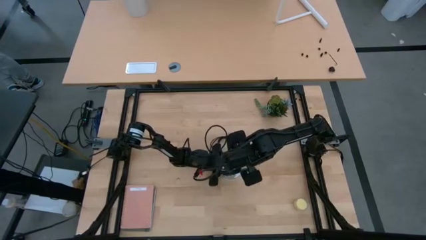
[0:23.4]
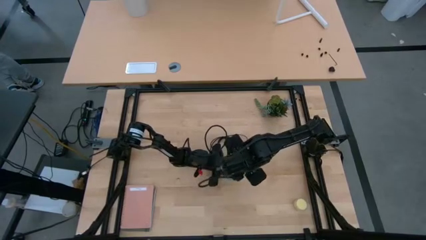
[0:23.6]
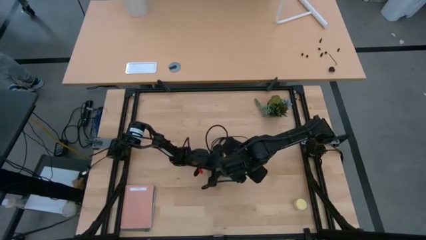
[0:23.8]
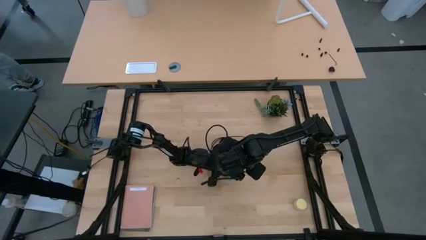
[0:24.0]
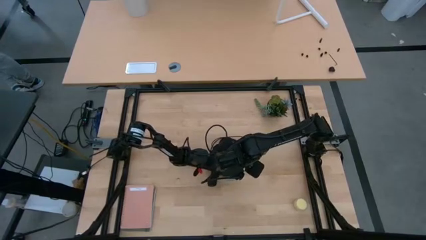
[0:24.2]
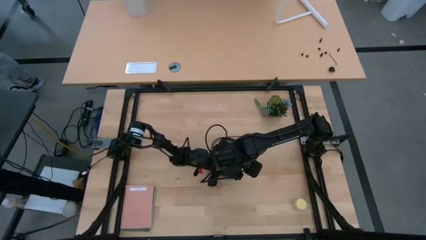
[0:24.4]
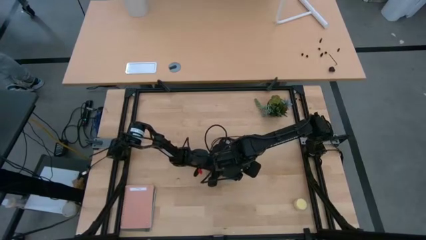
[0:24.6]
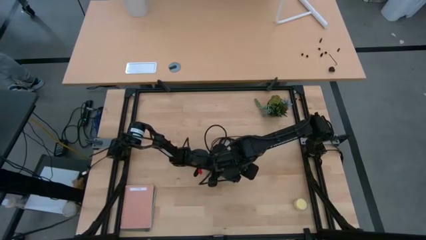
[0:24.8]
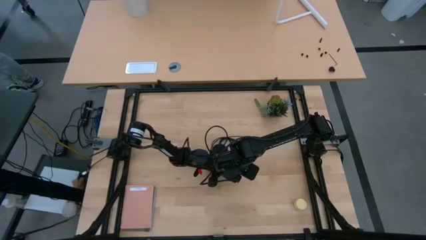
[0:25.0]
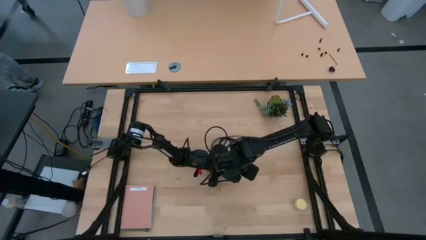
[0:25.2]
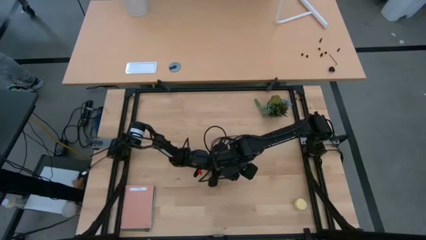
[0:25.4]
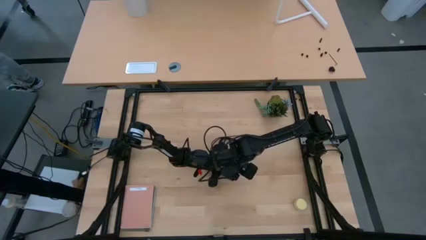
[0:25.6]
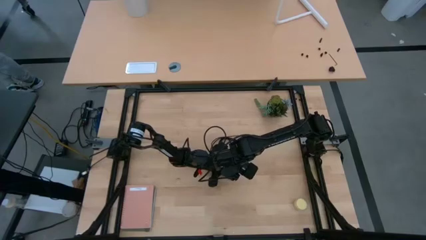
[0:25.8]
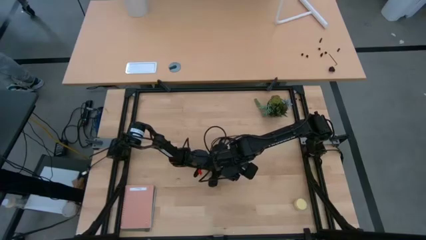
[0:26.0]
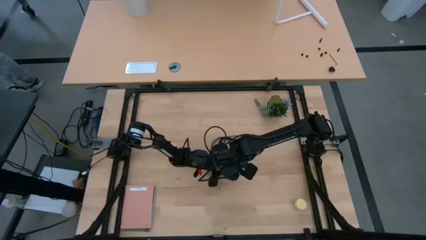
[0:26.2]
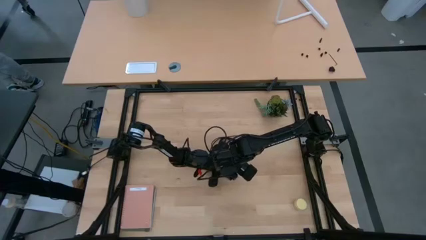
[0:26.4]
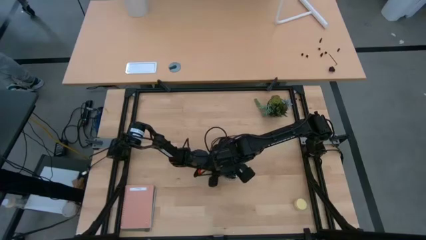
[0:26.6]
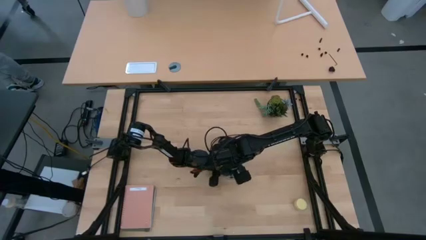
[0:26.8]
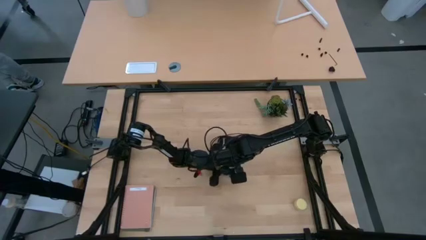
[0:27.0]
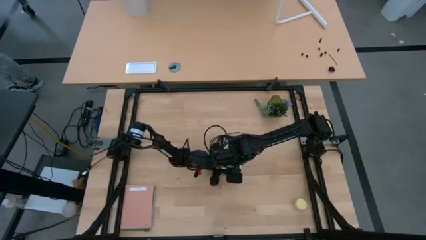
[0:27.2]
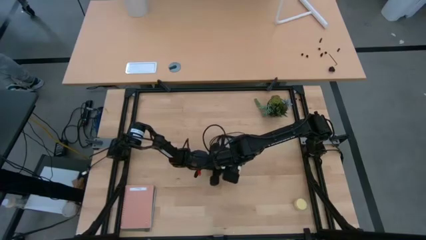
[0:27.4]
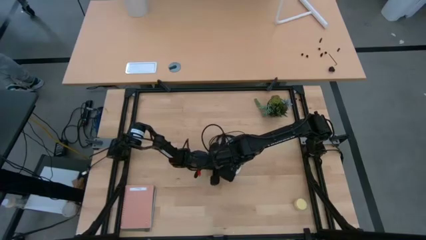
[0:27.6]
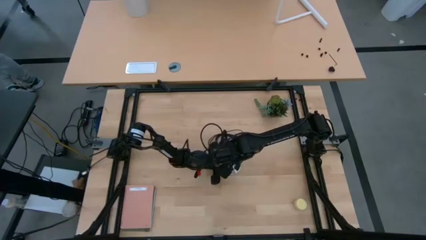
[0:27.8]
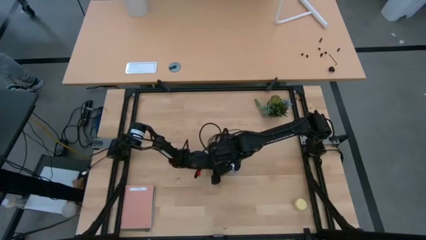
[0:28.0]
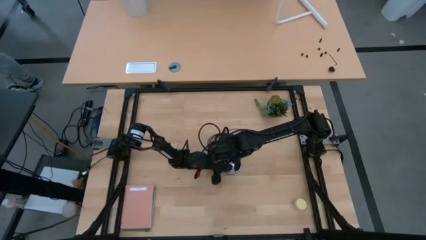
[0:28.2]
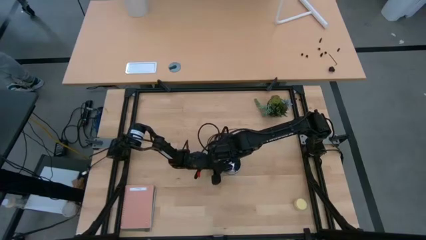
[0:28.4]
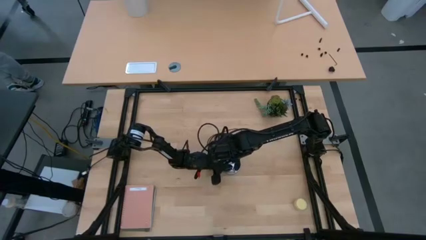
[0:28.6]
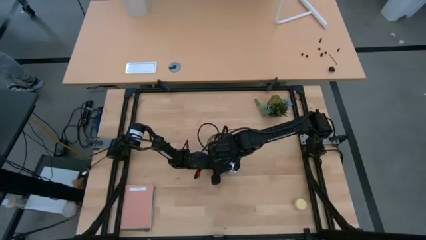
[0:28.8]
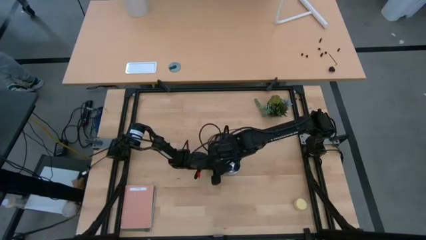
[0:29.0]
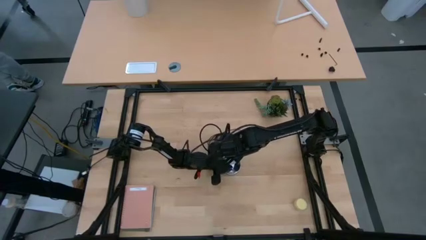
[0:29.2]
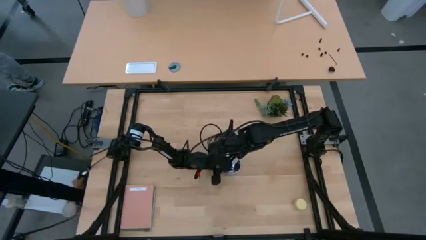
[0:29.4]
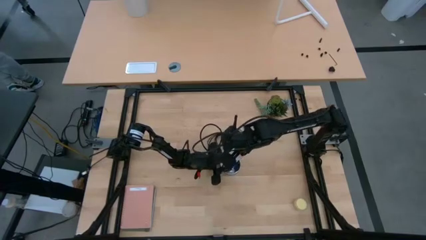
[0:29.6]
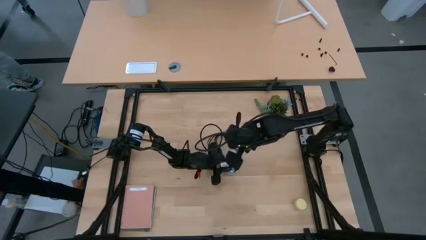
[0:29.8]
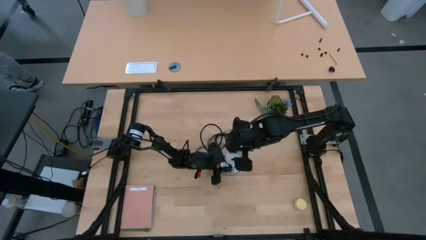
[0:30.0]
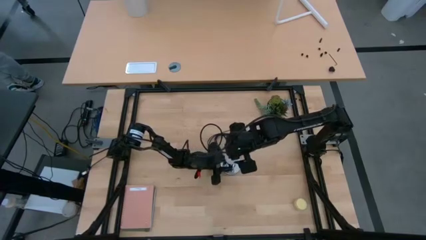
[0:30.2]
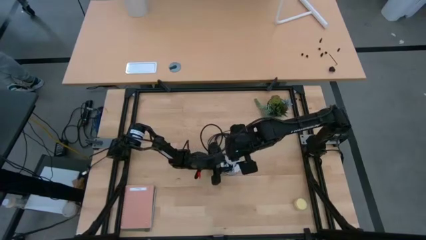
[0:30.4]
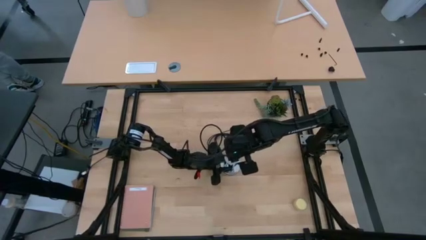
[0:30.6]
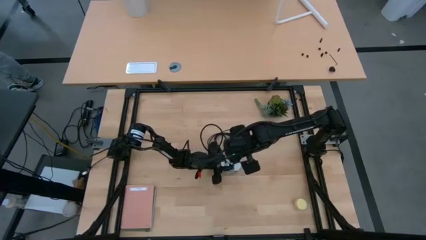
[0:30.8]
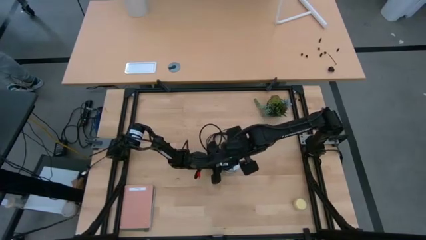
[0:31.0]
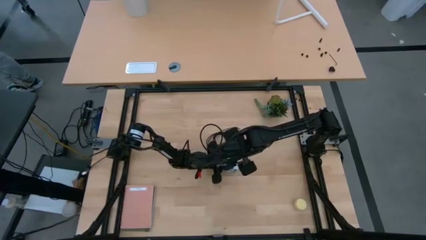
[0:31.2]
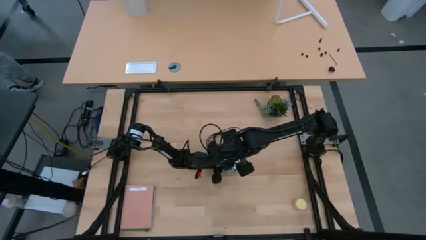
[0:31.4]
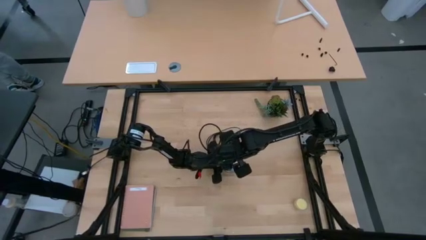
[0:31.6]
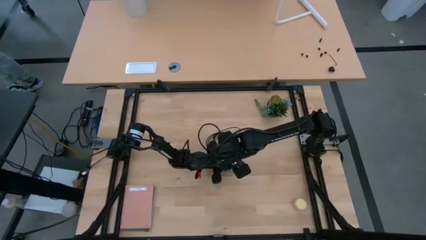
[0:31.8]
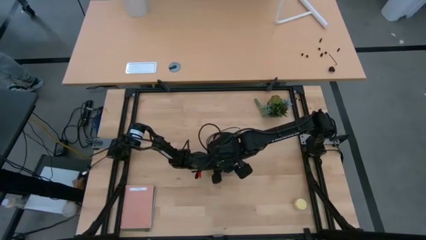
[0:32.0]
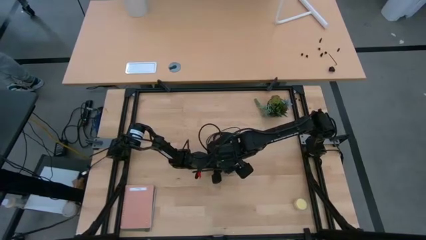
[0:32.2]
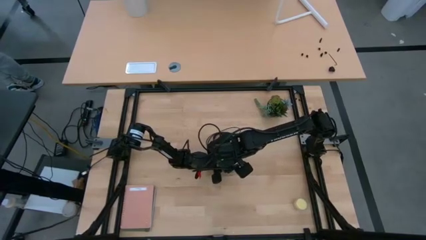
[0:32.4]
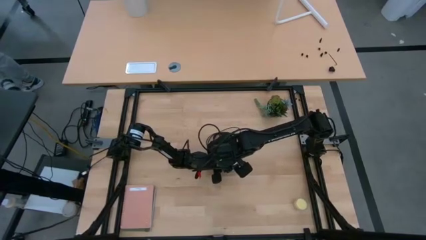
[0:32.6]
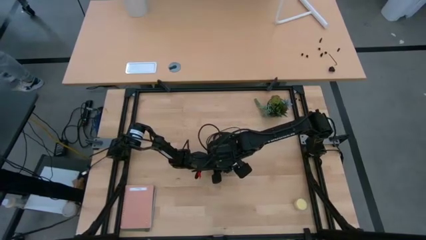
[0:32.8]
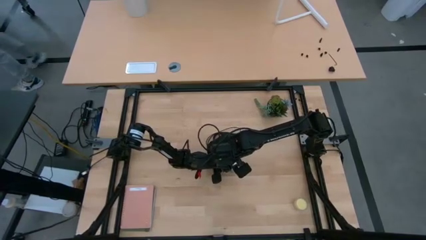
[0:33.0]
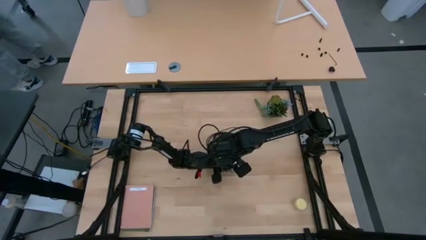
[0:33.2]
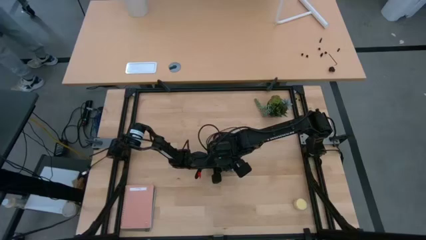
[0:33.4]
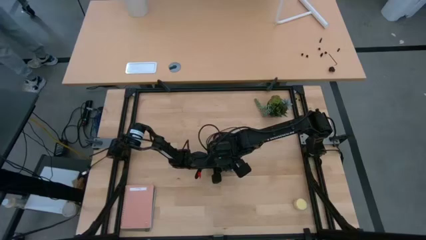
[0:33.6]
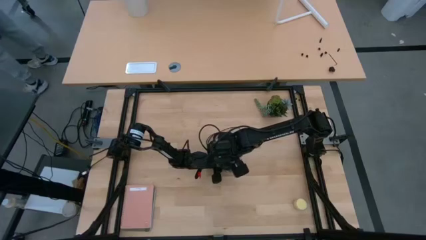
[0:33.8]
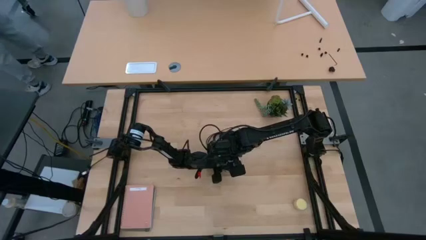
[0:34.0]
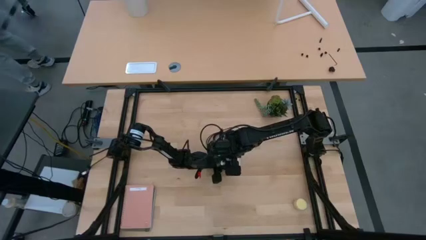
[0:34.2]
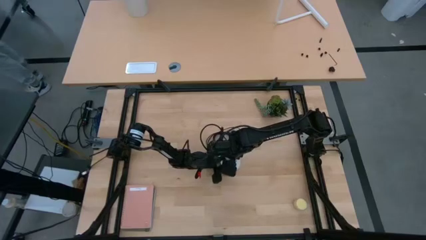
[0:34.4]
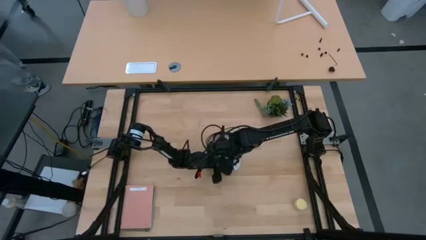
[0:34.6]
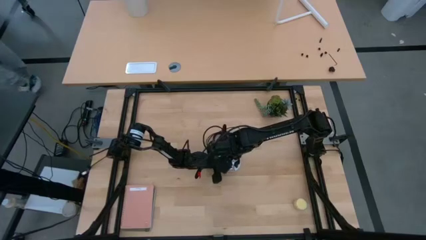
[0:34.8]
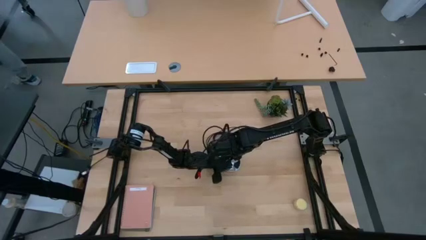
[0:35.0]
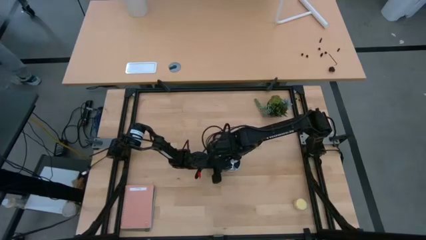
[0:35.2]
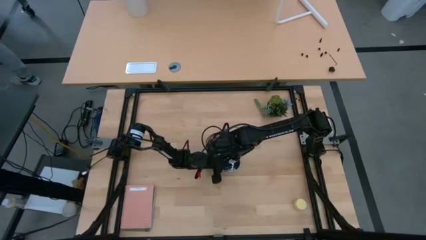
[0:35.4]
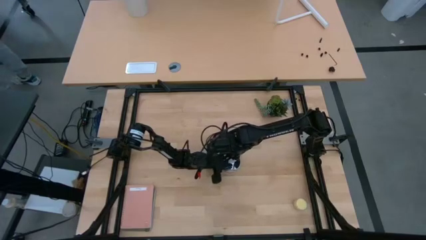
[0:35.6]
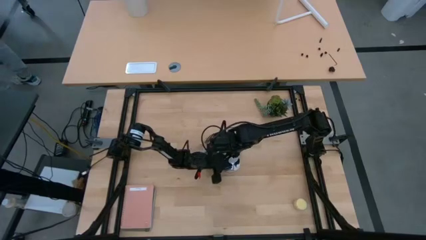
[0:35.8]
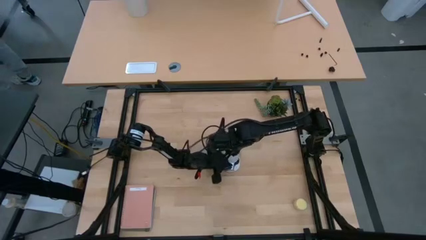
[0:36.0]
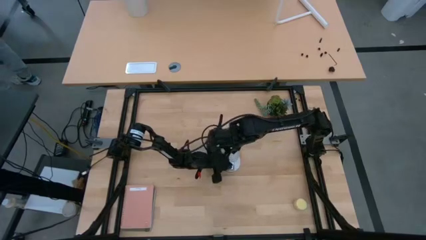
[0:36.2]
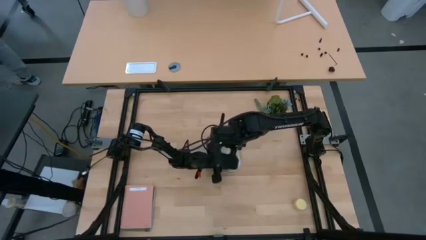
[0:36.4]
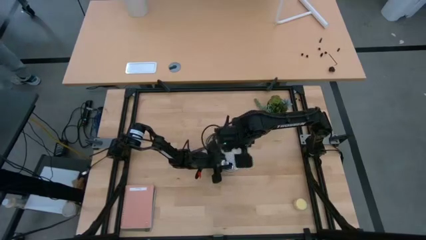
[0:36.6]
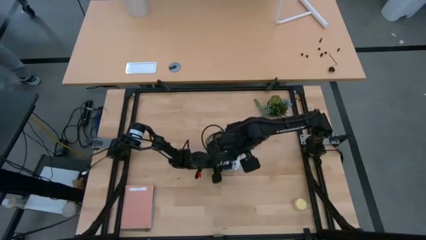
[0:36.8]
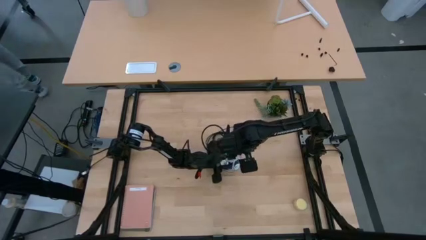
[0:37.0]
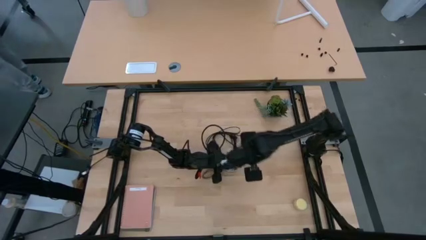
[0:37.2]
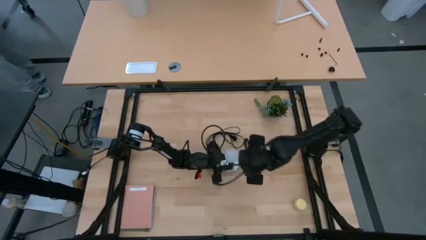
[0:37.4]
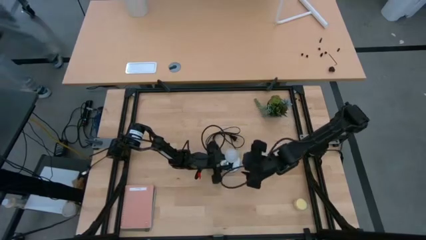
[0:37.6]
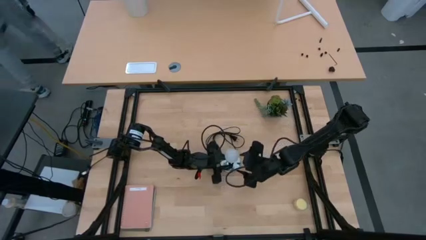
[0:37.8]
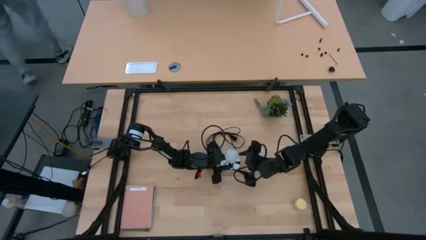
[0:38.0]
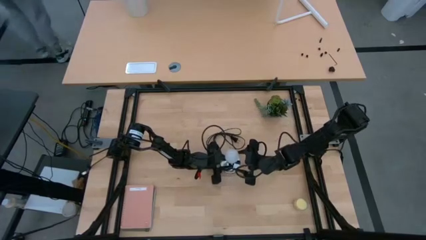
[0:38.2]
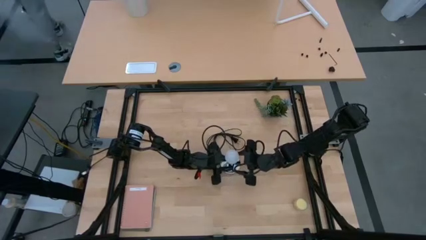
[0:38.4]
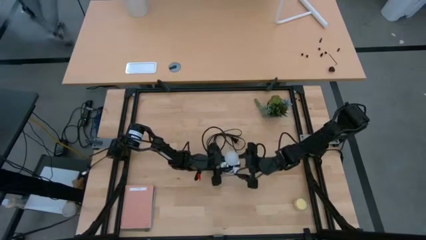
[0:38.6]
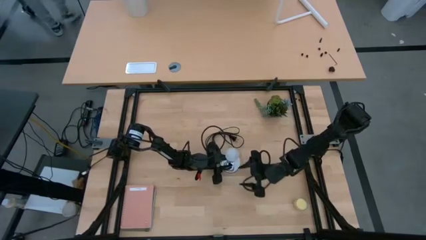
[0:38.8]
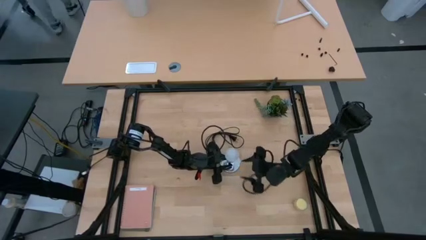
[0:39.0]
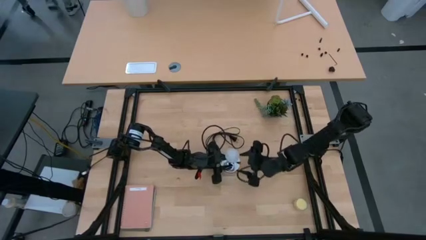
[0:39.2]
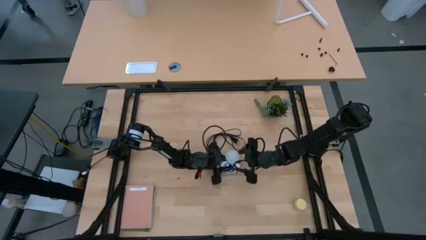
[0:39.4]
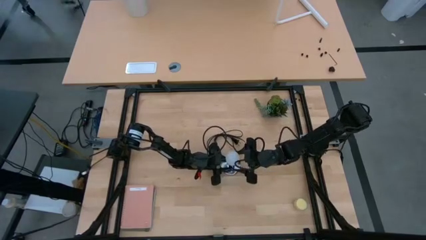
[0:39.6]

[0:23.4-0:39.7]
Task: Screw lightbulb
Insert the lightbulb into the lamp
